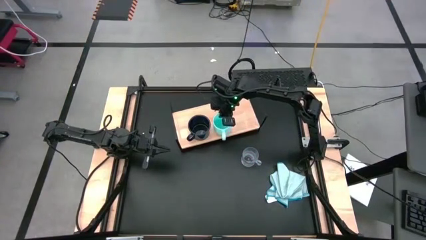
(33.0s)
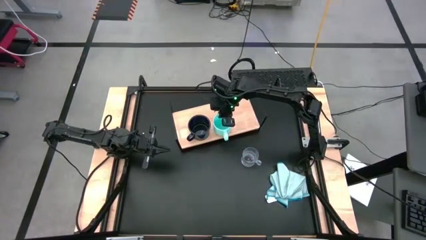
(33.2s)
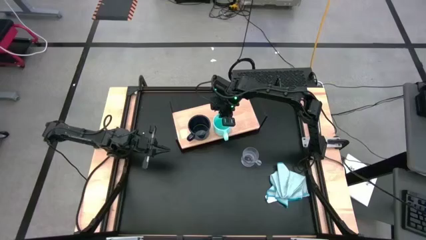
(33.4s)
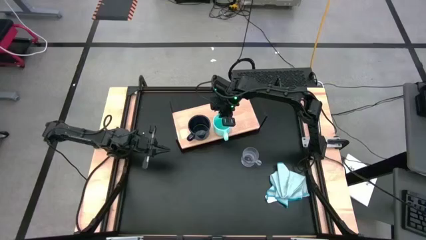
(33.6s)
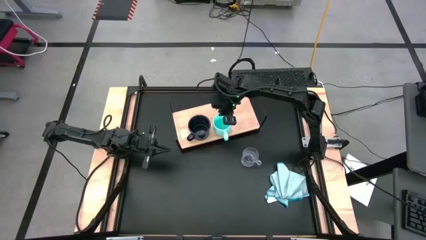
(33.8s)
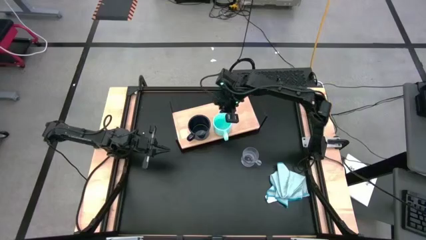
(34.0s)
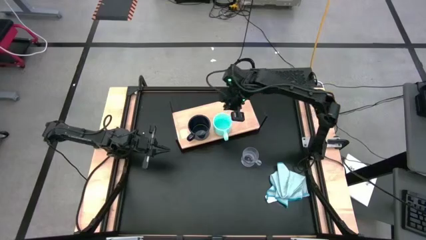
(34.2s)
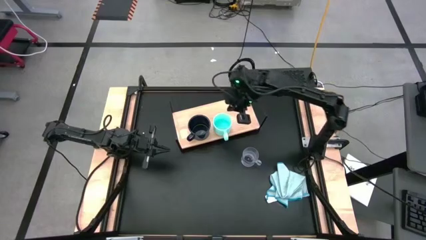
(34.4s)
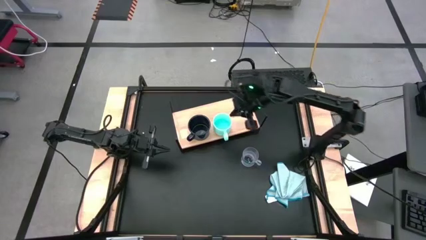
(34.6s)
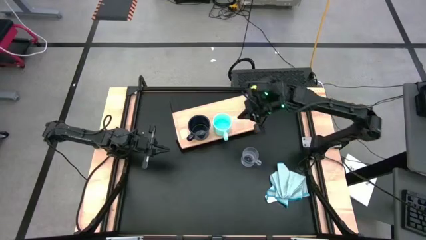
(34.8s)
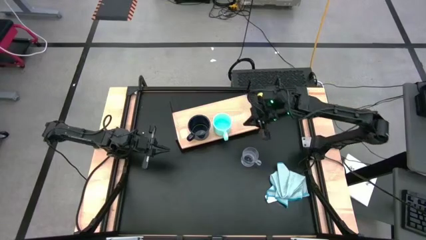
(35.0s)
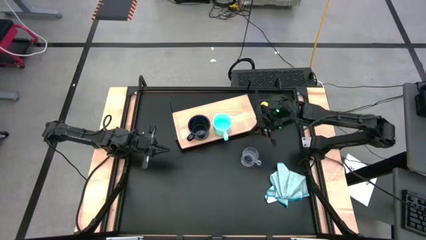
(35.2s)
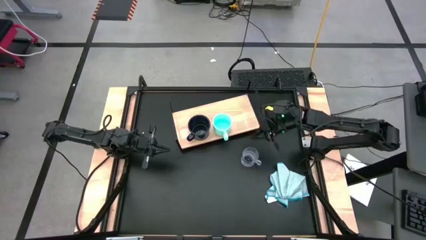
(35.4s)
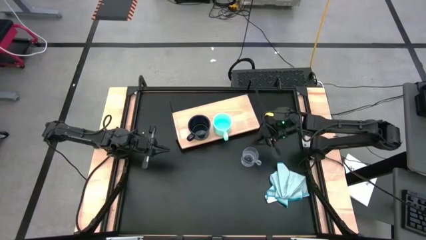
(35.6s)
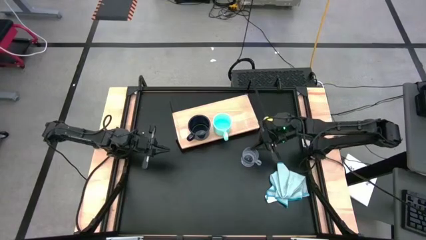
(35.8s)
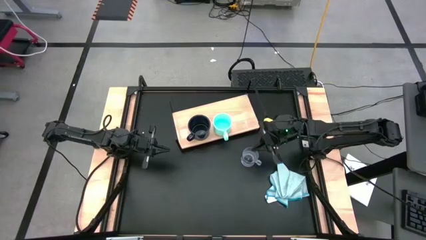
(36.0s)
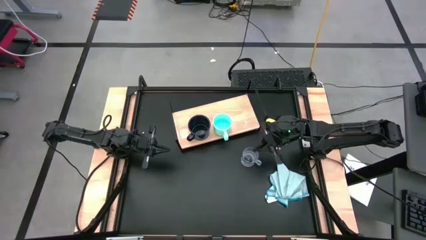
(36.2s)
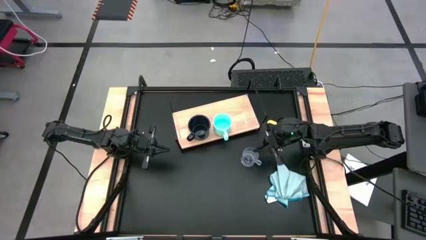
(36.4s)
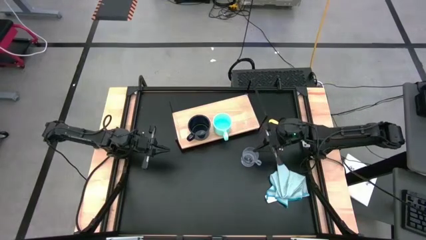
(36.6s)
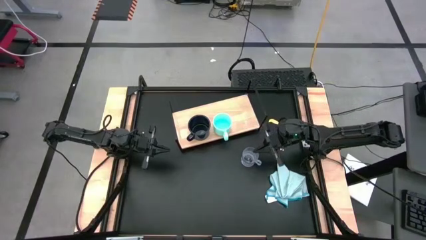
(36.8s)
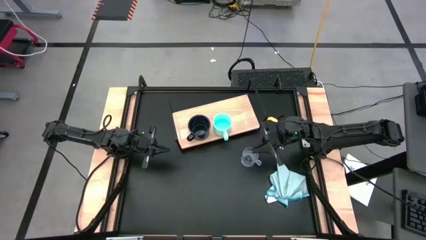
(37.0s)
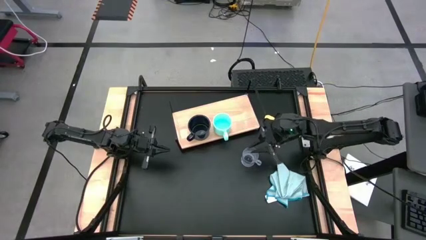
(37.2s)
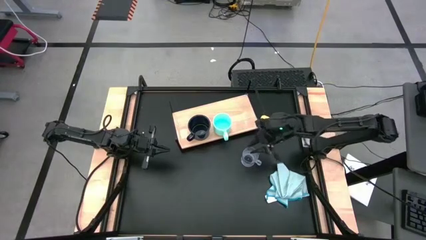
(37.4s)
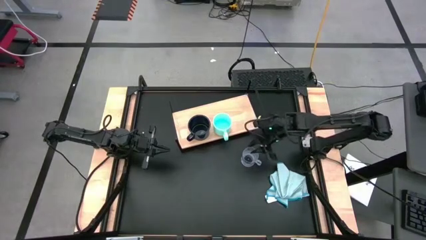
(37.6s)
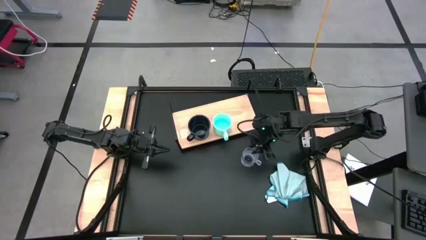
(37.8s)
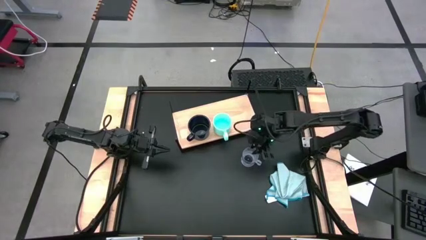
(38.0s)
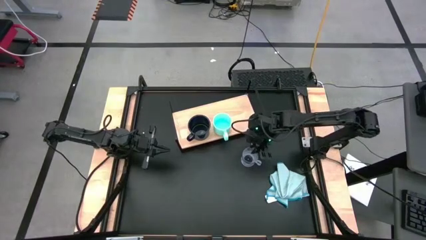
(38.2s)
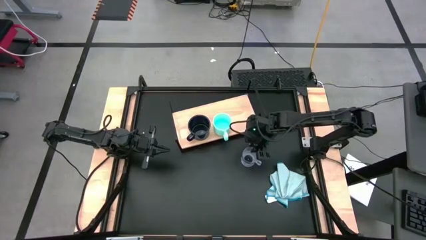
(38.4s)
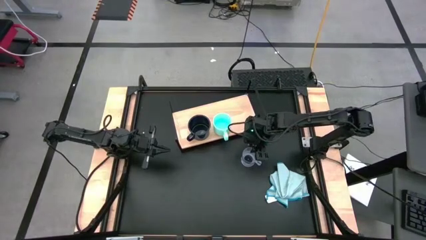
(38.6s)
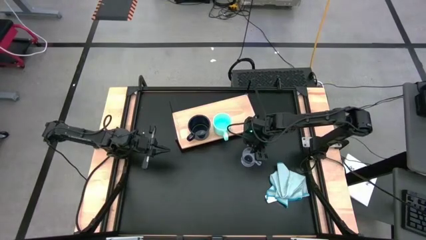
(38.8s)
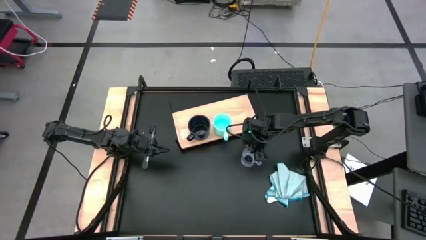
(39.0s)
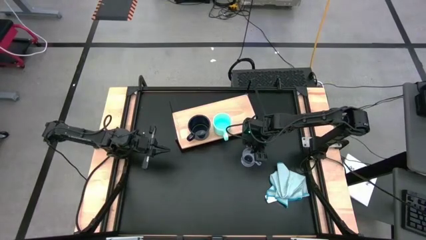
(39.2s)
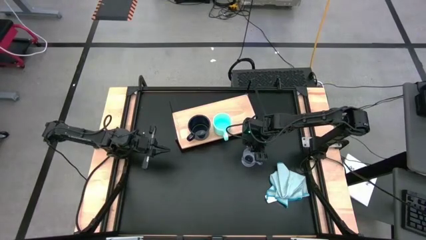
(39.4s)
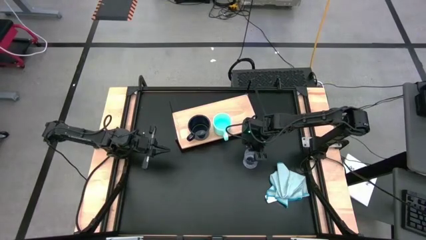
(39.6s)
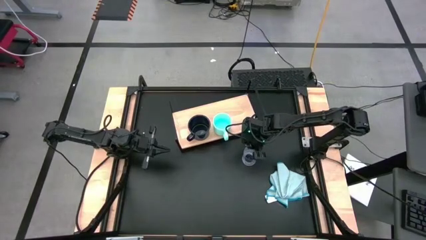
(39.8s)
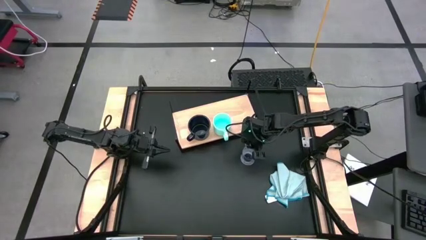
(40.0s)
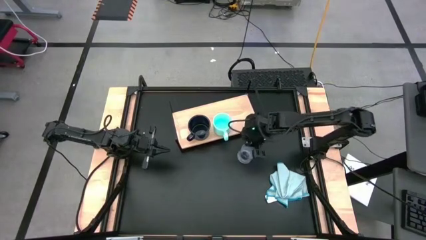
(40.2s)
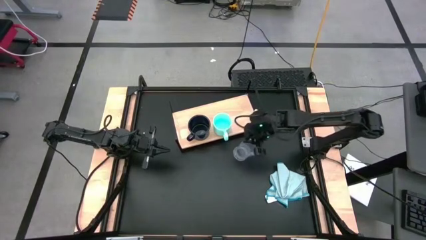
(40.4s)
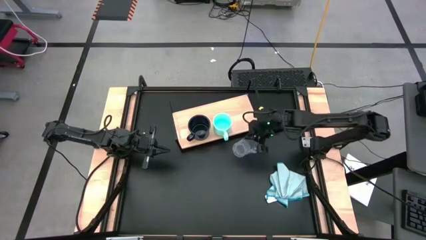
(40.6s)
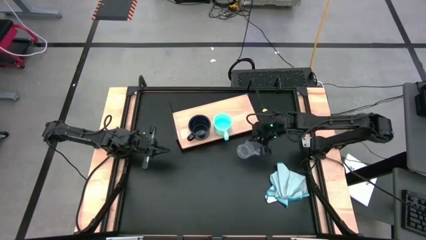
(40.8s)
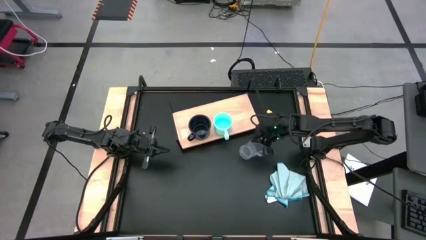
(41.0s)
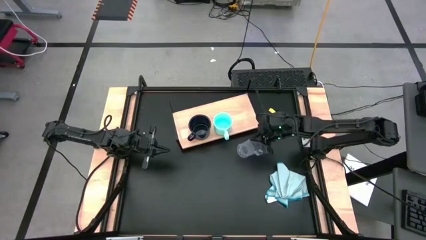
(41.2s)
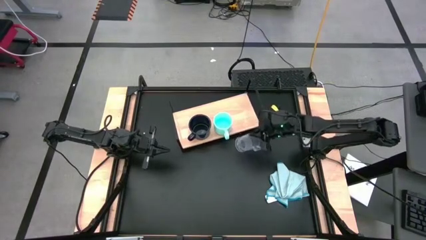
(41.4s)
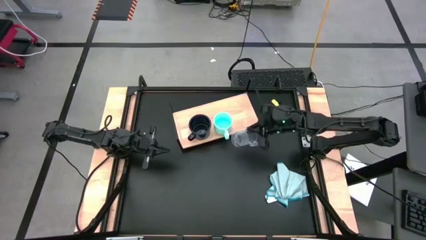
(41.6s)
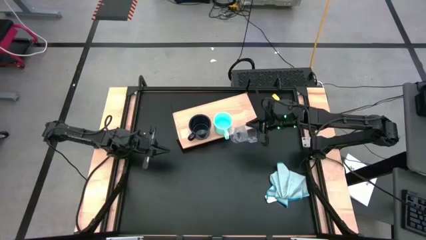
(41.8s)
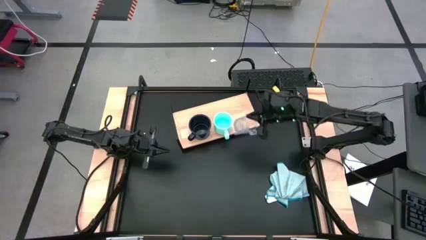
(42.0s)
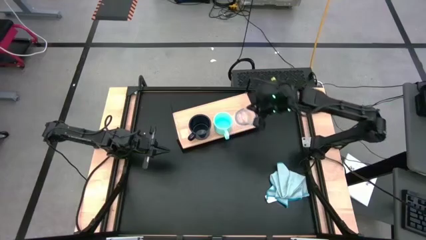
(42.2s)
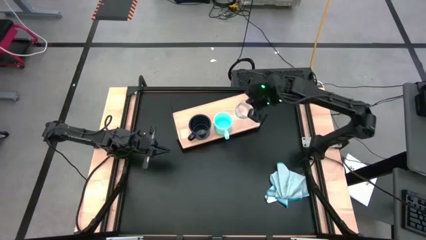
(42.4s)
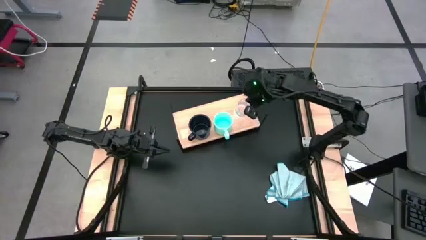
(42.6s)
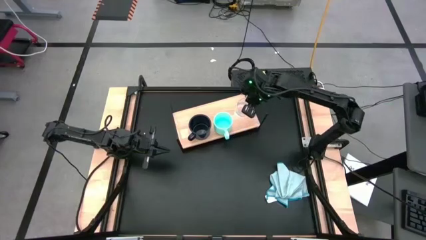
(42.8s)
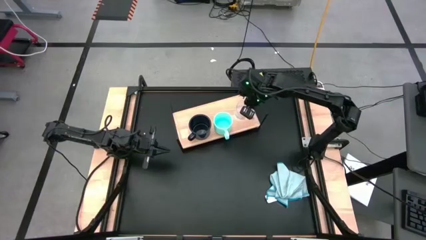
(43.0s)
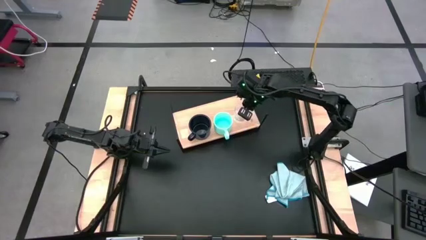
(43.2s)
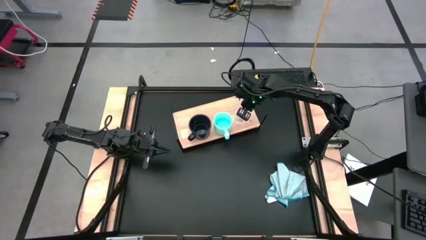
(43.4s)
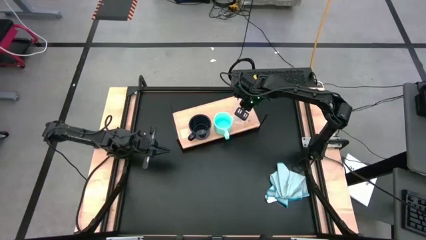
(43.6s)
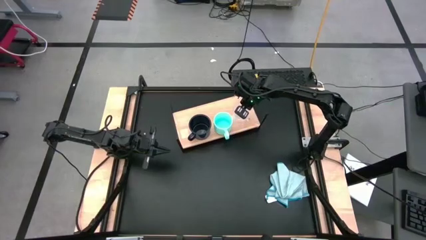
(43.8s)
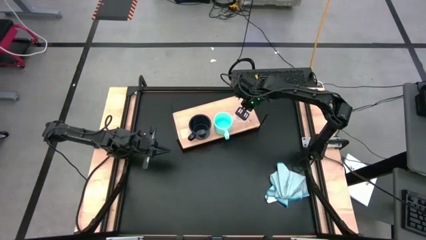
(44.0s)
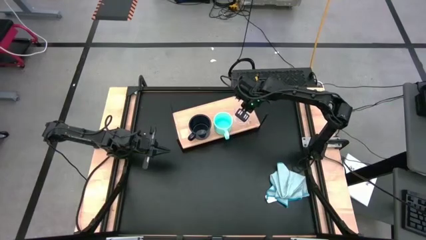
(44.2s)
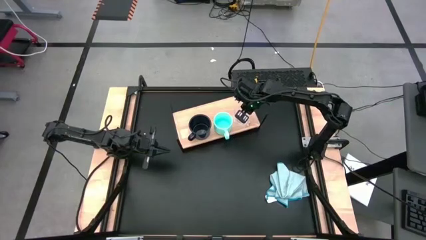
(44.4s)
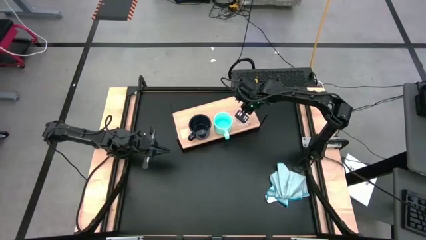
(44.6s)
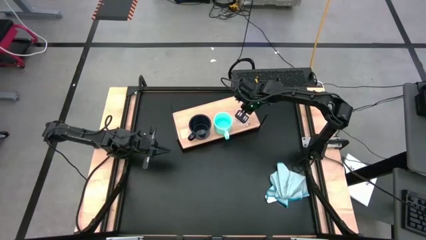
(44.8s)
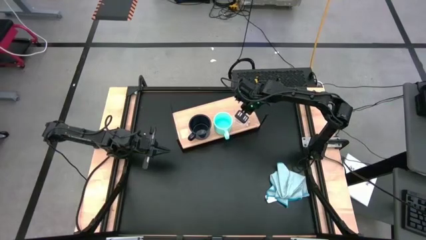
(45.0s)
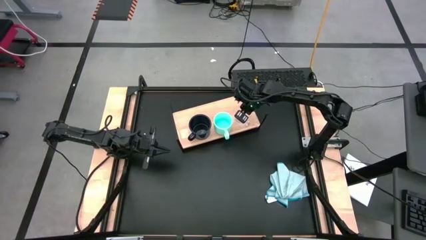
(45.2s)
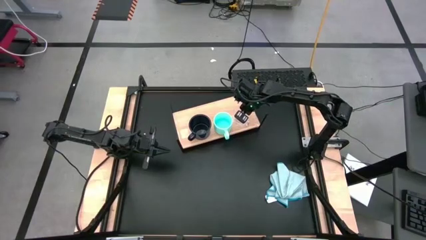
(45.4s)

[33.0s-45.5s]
Task: Stack small to large cups/mugs on shelf
Put the transparent cup on the shelf

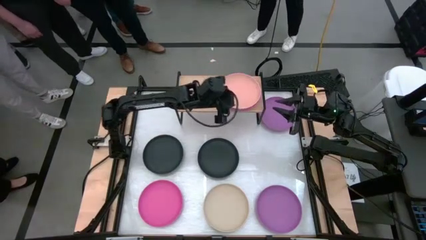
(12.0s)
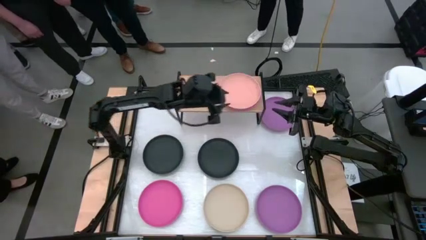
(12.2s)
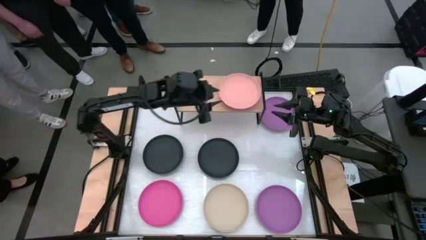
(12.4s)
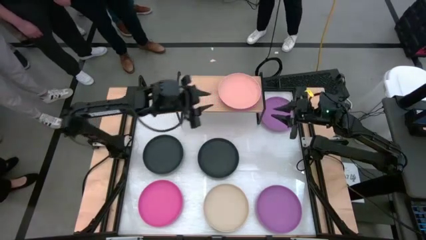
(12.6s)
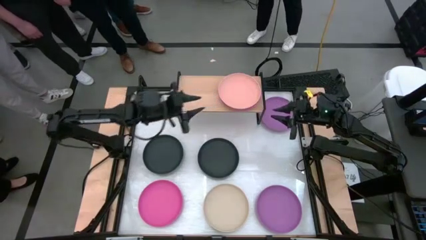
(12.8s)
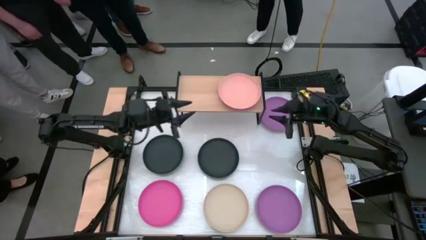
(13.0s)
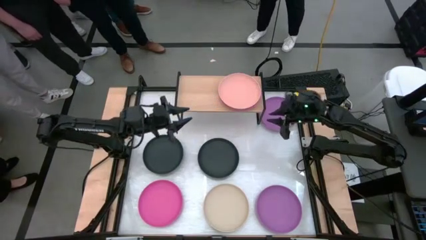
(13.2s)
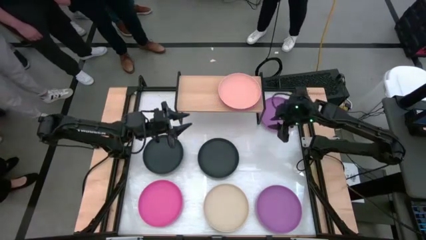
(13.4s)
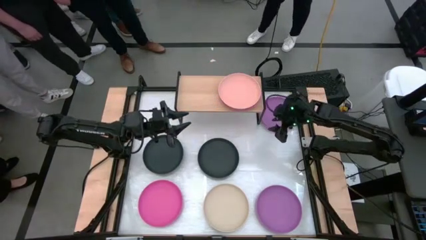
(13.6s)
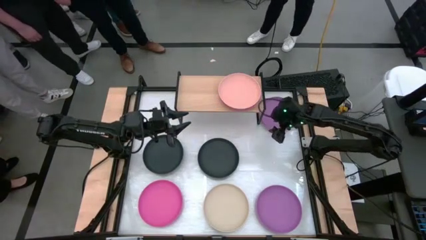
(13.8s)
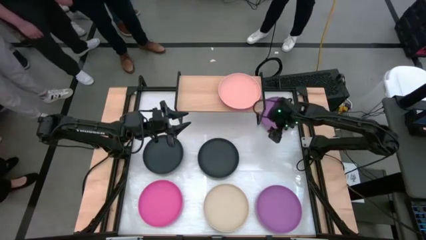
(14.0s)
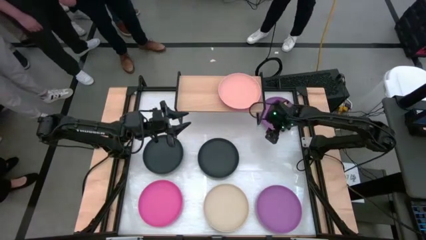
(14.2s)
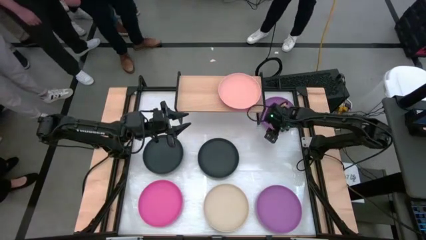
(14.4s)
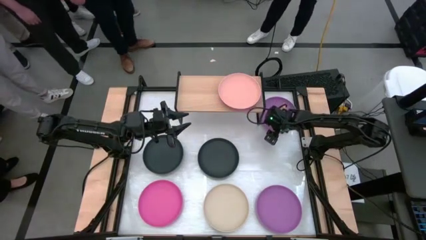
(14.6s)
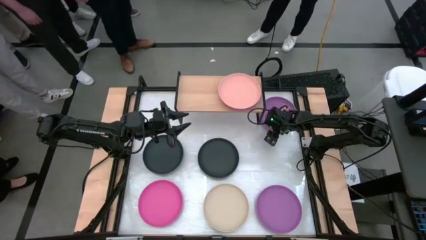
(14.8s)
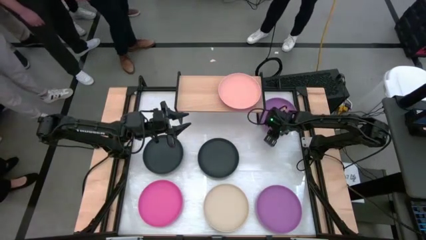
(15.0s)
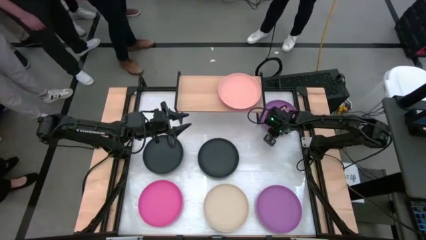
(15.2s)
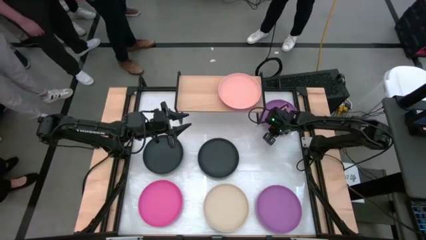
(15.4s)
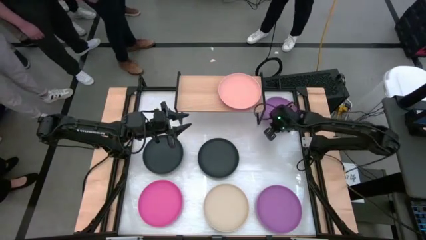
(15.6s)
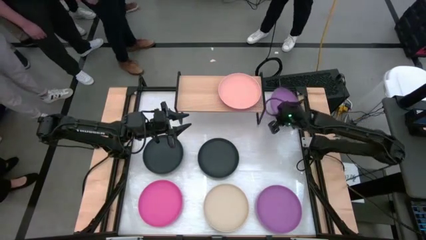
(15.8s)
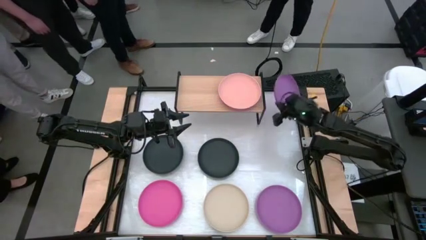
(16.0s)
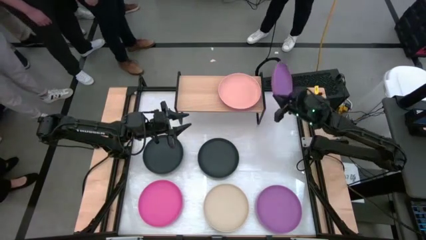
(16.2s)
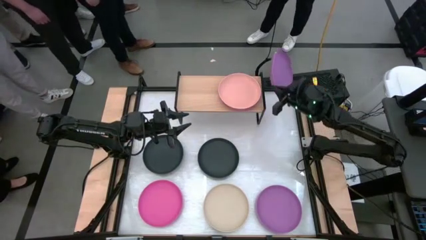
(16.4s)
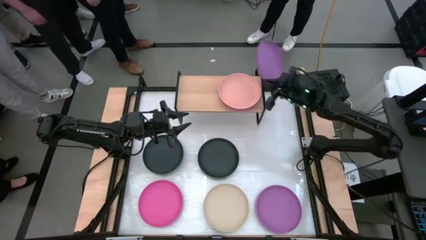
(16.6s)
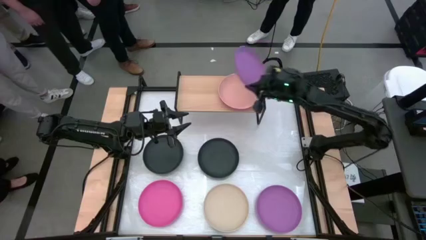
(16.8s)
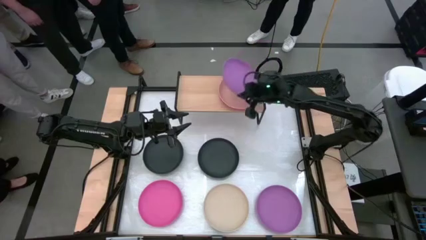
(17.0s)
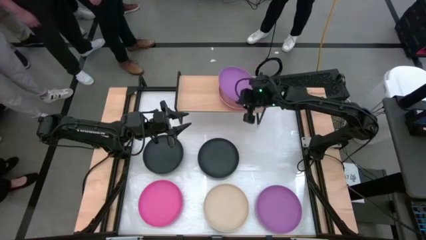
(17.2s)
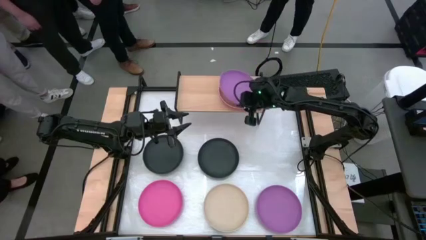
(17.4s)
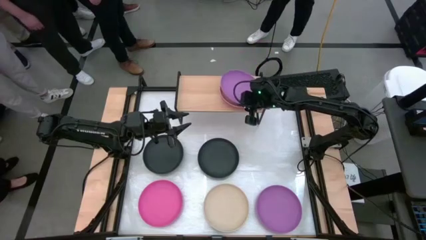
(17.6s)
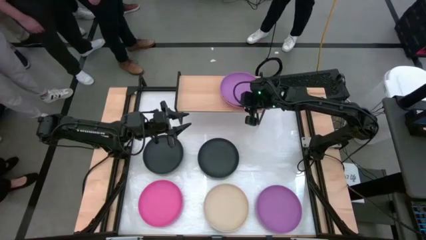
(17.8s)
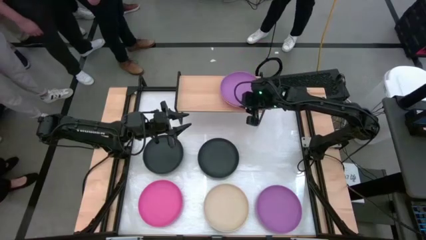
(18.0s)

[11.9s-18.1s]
Task: Place and stack plates onto a shelf
Stack the top purple plate on top of the peach plate on the shelf
